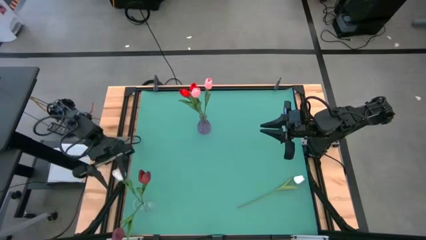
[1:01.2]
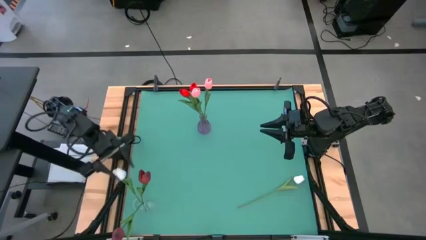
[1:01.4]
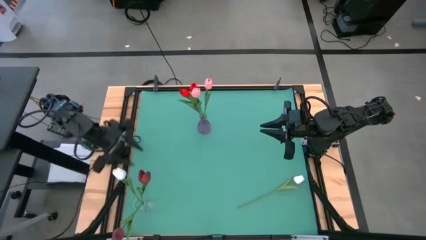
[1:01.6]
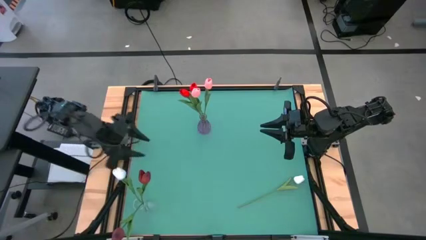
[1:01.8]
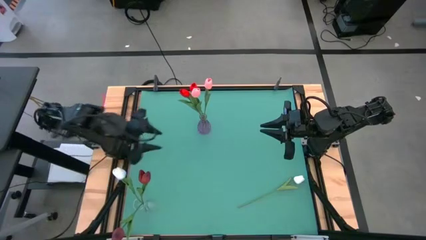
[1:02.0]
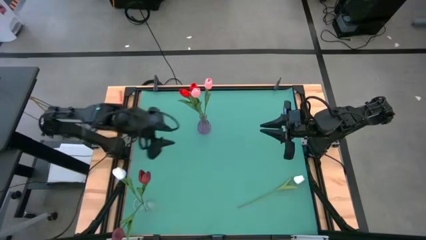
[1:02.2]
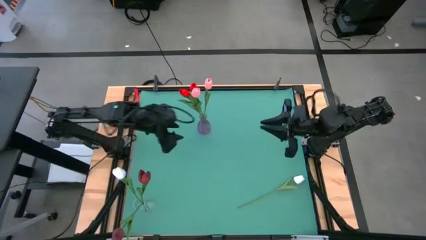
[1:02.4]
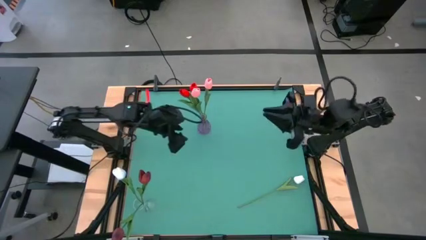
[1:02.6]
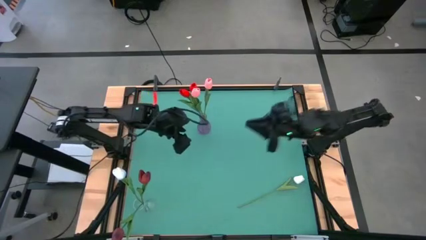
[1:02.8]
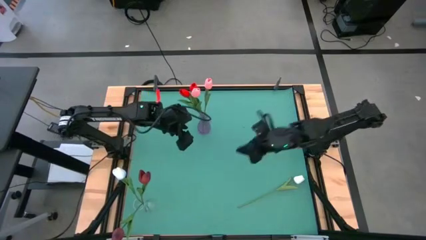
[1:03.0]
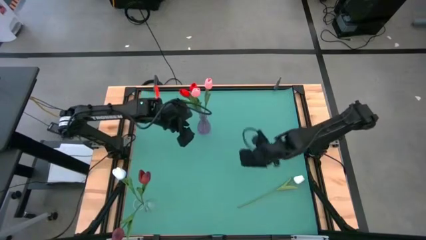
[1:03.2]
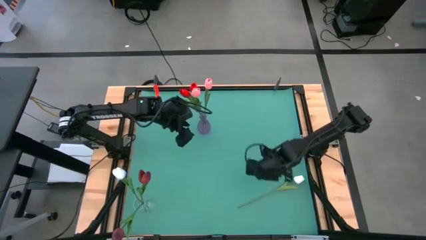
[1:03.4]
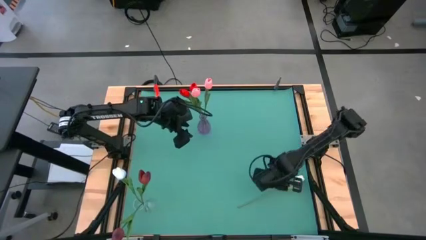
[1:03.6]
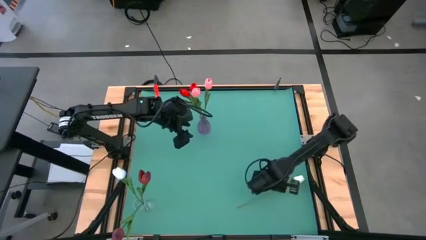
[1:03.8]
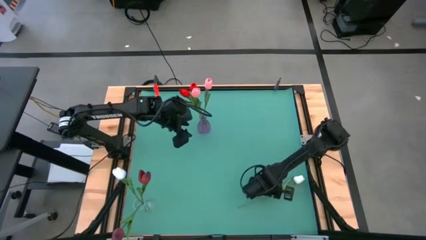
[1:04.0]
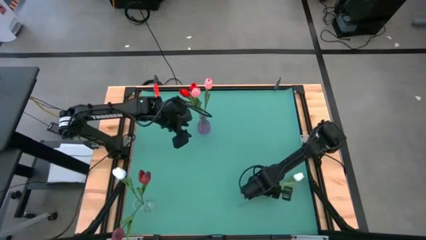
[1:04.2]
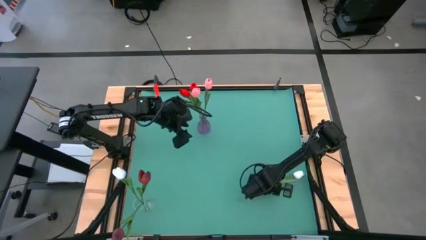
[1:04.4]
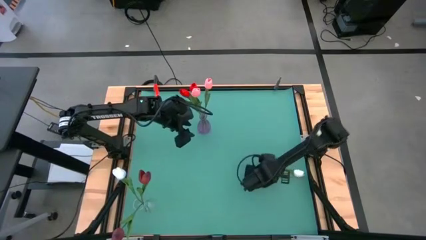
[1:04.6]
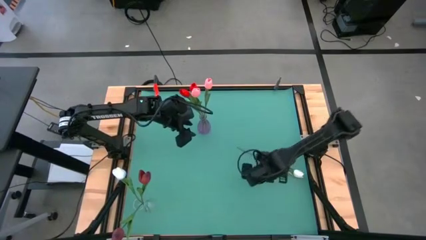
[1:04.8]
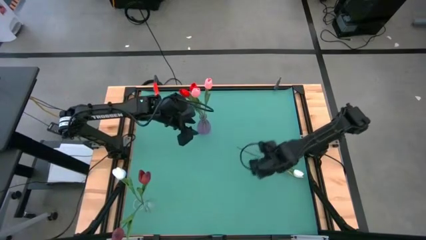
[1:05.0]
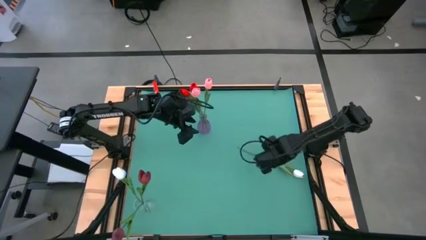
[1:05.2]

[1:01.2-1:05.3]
Task: Sort flowers into vase by color
Put the white flower into the transparent vase

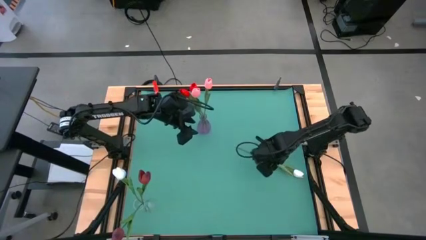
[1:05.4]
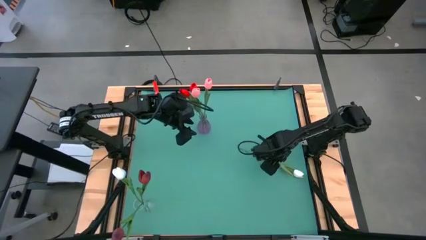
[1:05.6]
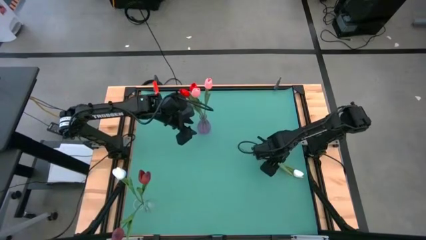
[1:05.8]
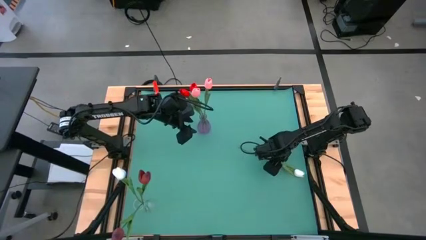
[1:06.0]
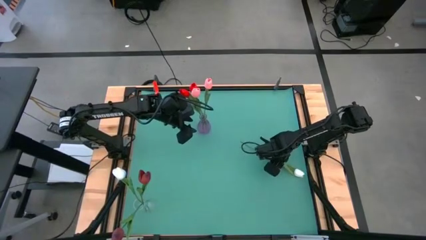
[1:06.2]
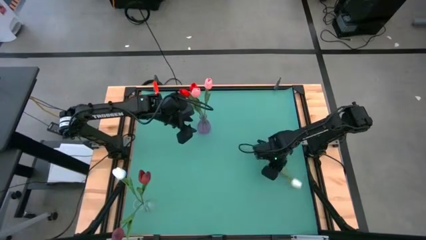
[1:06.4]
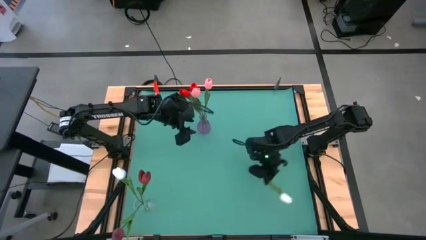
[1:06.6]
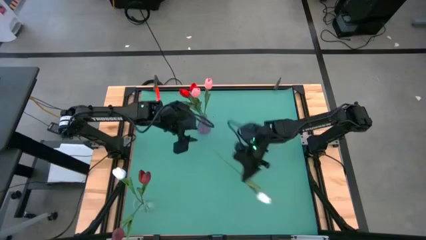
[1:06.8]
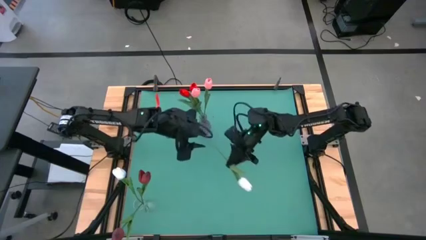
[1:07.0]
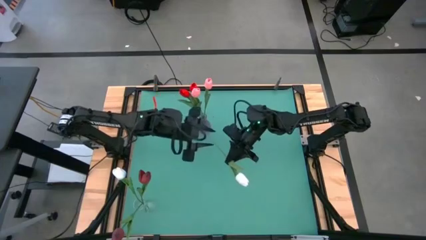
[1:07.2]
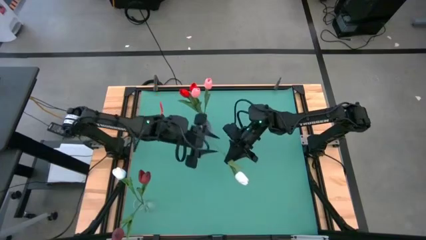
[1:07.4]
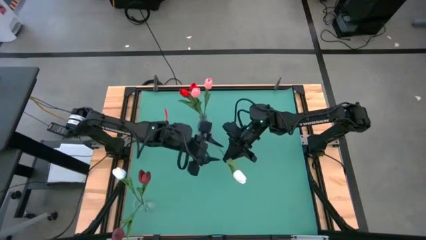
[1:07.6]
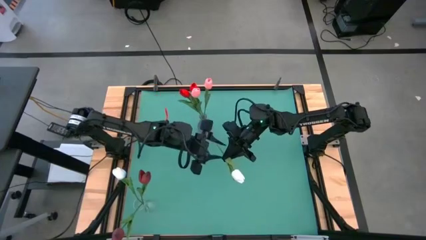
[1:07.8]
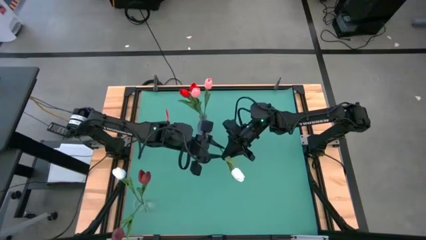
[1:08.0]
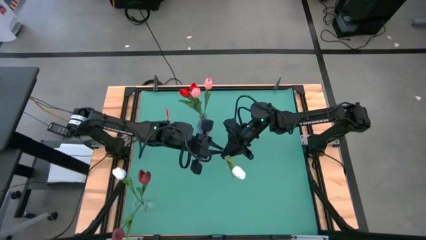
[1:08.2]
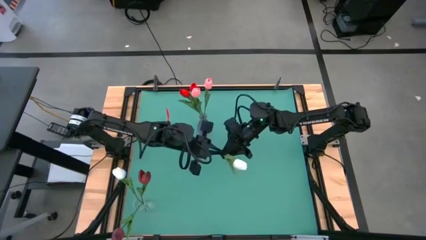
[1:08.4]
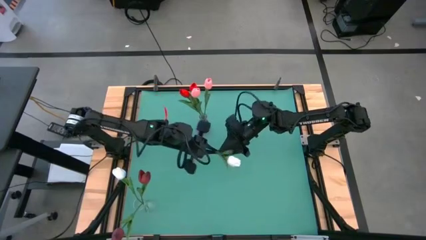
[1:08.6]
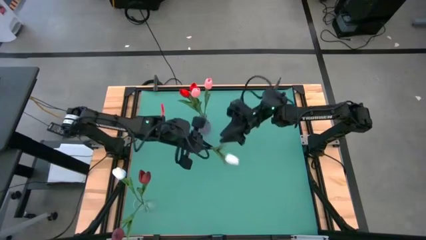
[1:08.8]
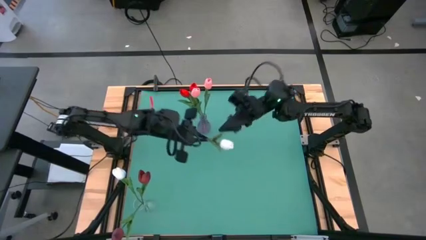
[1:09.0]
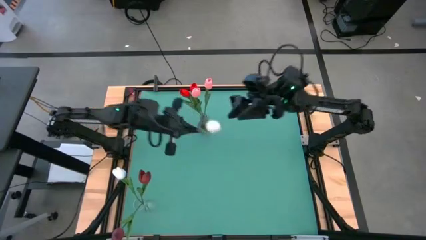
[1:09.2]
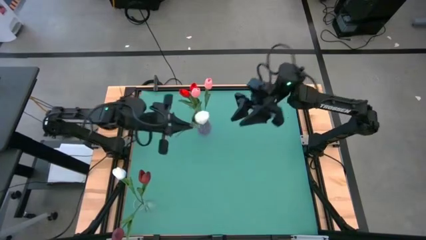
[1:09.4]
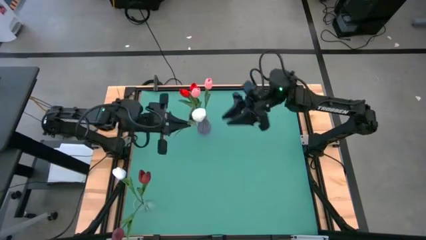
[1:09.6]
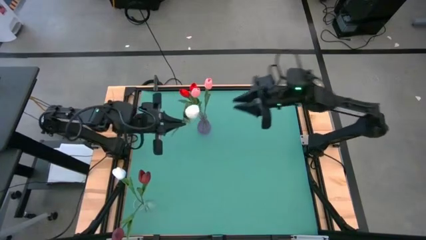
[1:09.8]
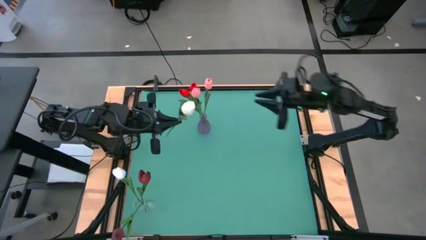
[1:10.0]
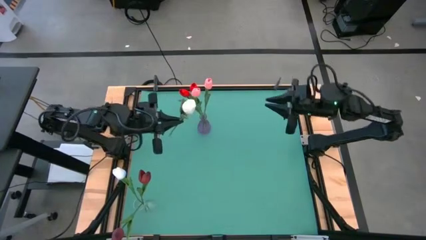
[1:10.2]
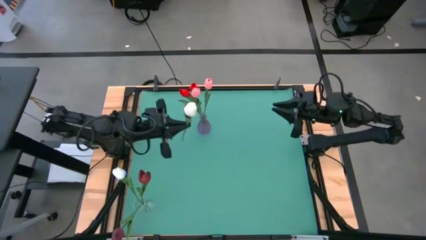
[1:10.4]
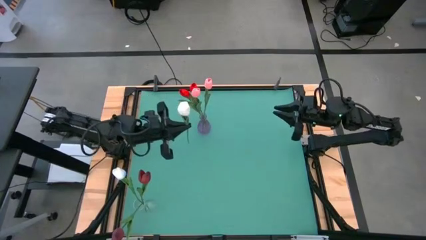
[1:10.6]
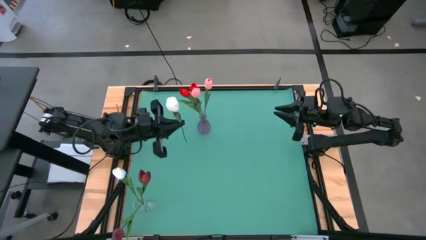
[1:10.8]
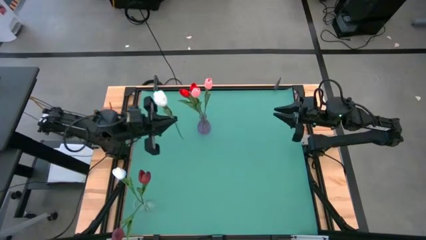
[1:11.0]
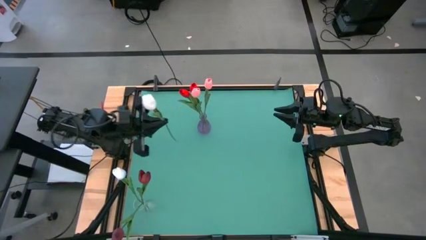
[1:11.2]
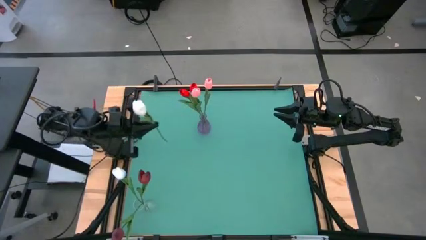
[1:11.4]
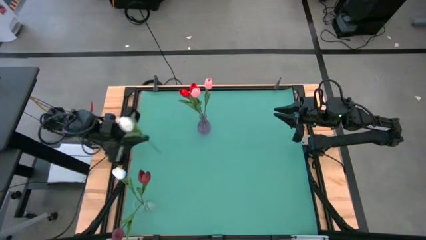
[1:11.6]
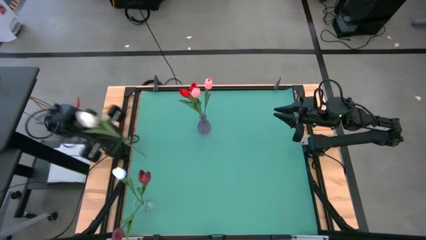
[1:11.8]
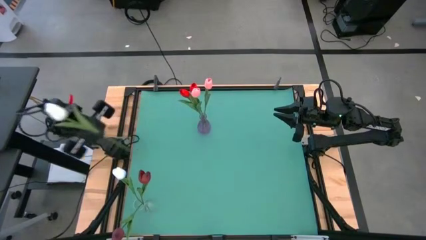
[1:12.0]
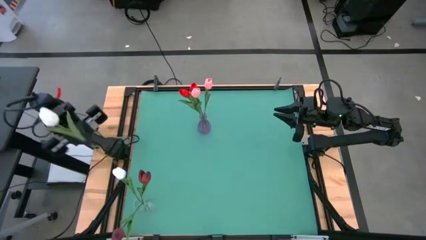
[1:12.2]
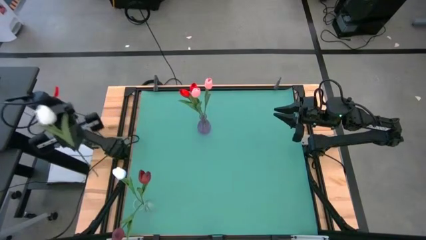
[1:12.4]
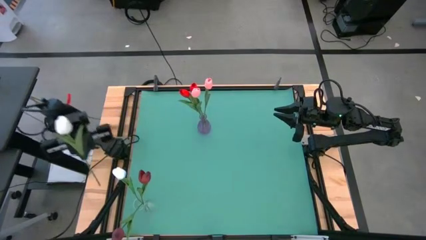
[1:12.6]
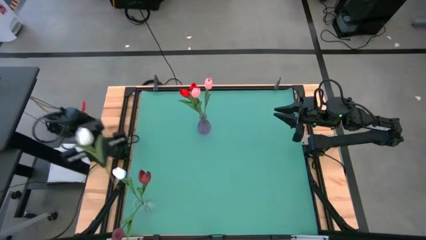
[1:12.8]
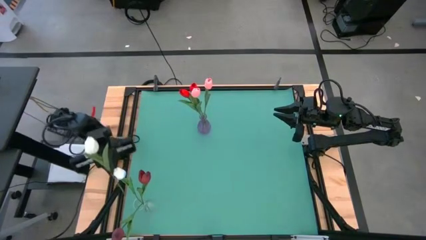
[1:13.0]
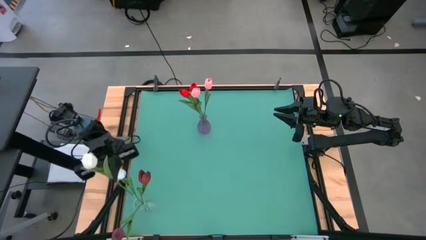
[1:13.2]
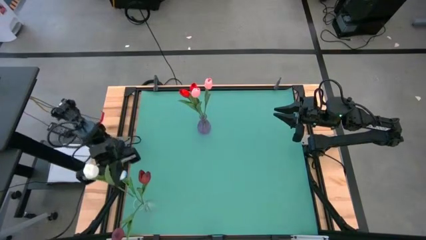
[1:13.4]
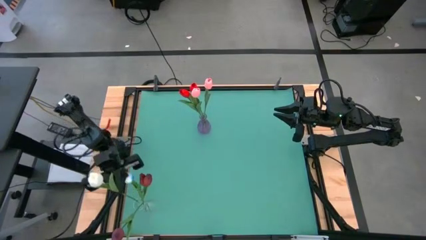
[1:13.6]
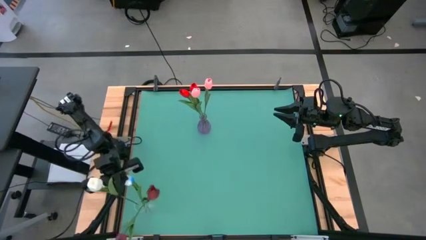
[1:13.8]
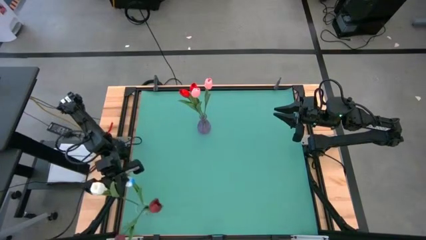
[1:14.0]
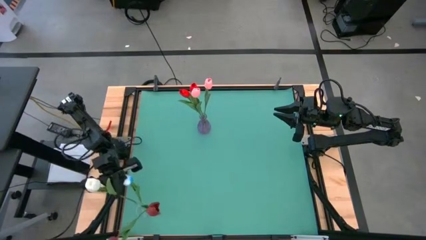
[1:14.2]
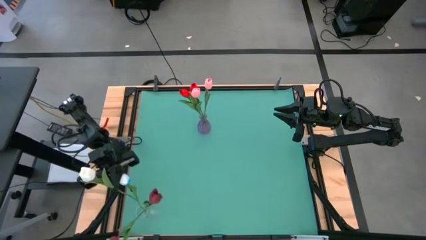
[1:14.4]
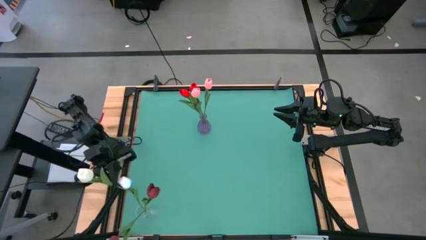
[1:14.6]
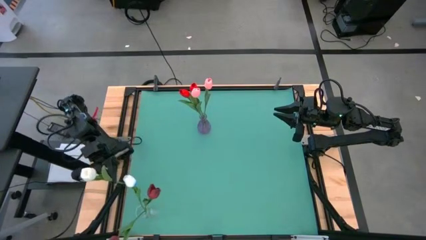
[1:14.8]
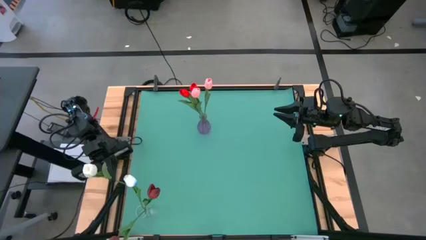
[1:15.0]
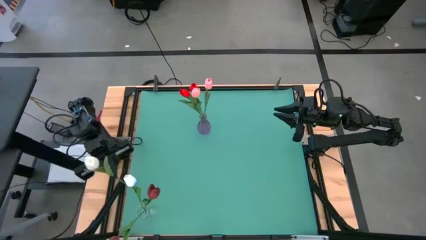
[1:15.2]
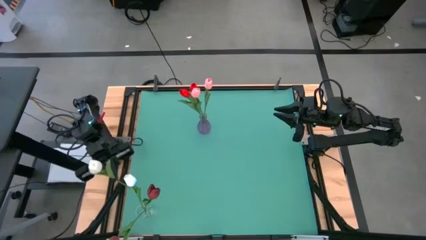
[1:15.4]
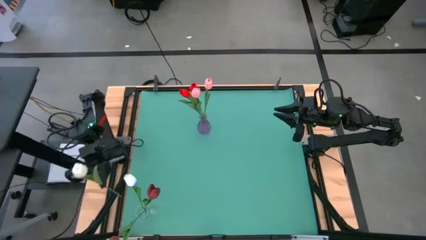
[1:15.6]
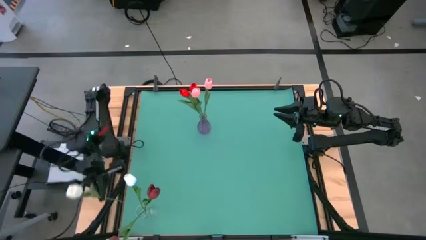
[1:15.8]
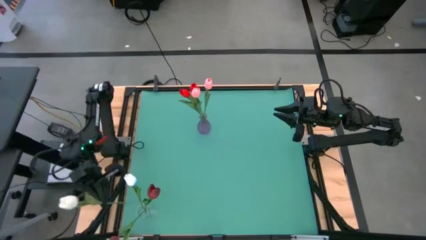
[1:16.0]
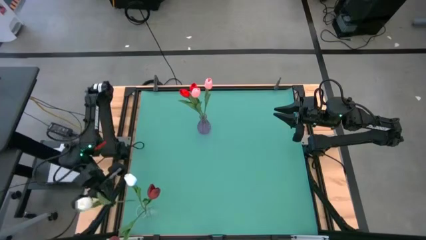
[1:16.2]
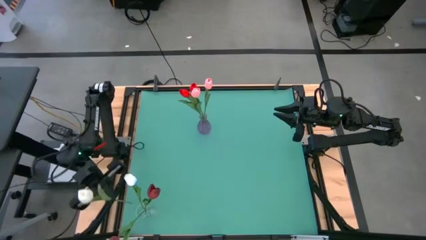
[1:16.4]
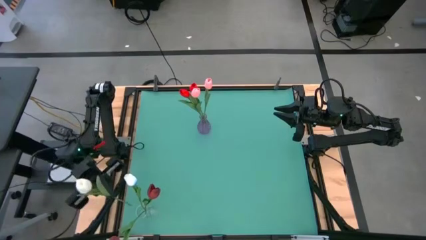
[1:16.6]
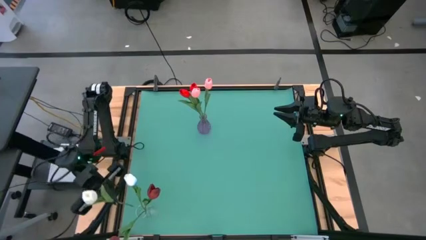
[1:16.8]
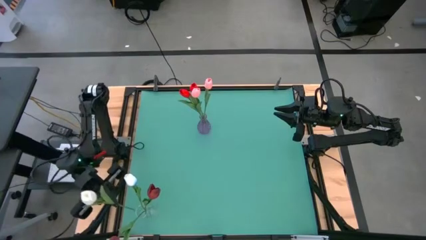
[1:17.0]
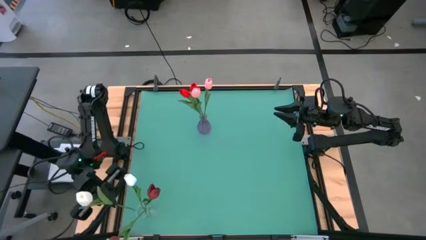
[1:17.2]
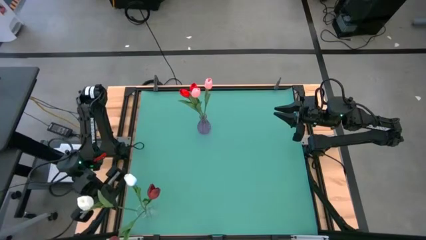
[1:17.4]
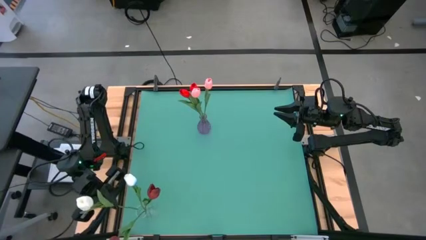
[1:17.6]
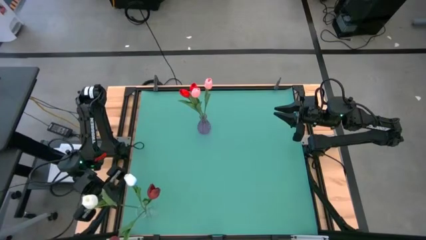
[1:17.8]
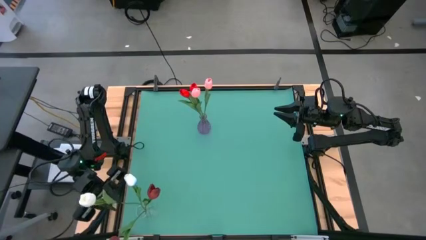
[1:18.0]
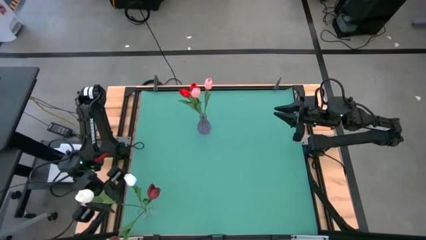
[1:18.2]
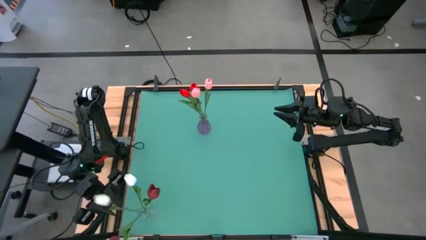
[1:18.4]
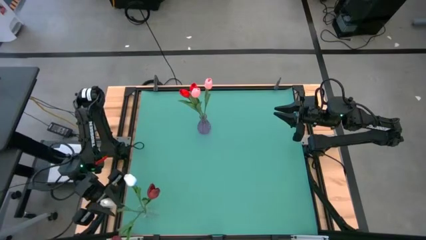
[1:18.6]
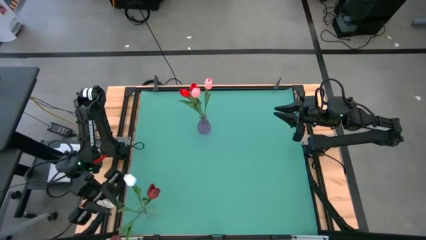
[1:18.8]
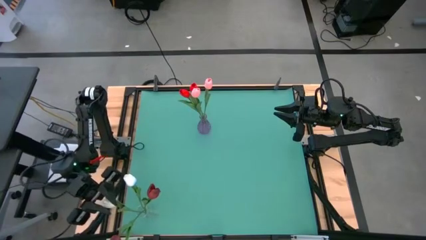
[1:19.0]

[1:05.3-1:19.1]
Put the white flower into the transparent vase
